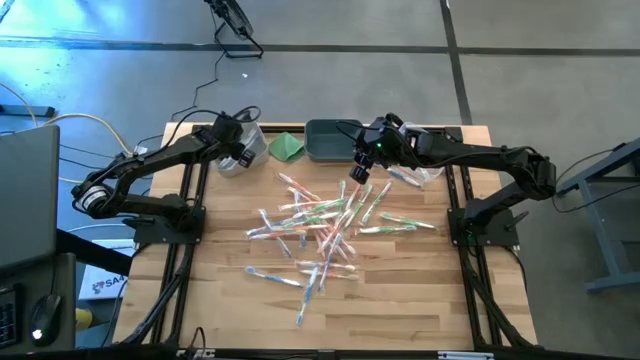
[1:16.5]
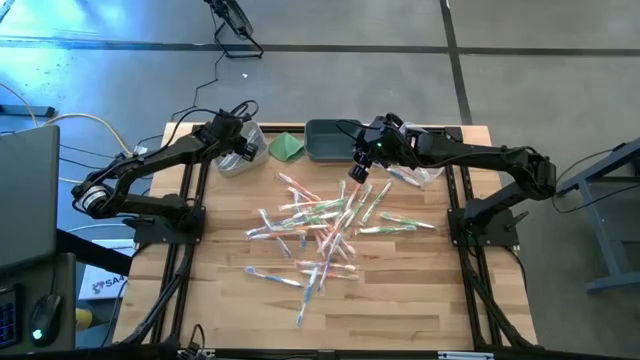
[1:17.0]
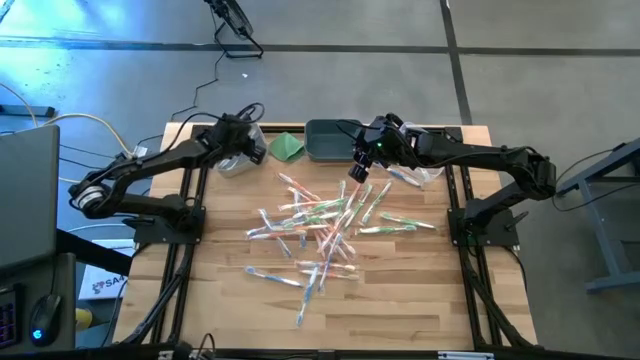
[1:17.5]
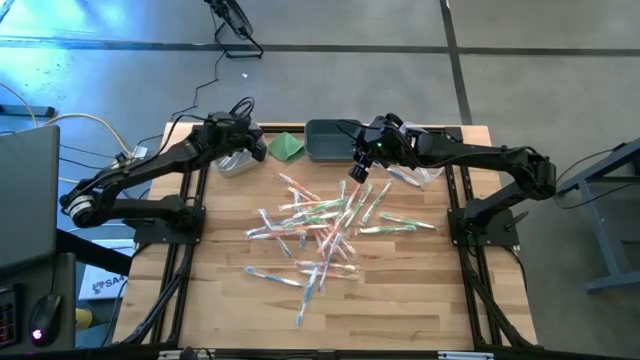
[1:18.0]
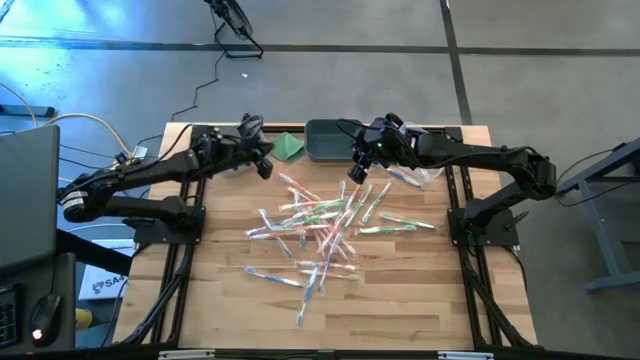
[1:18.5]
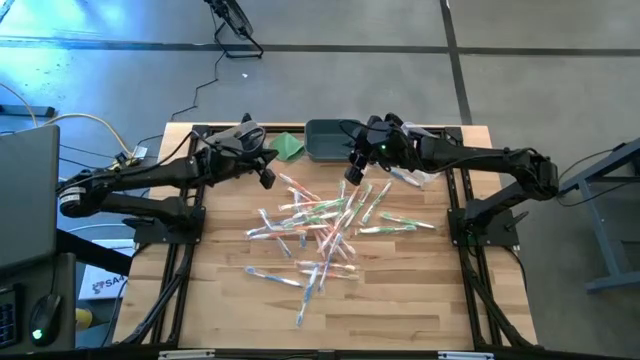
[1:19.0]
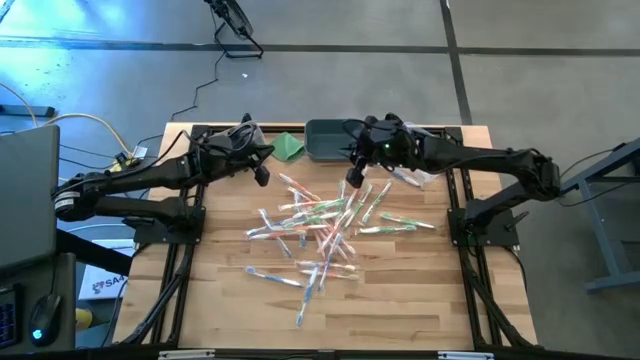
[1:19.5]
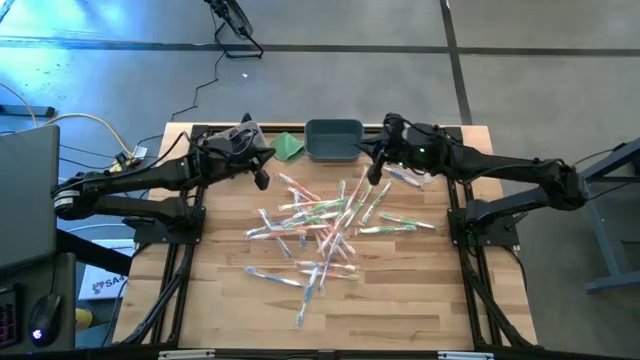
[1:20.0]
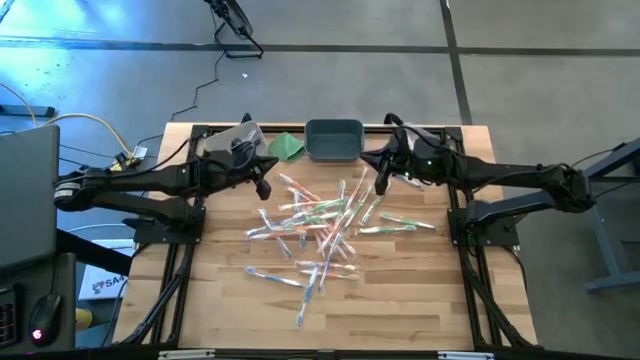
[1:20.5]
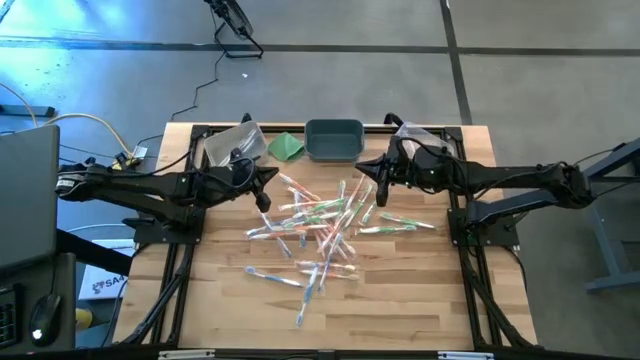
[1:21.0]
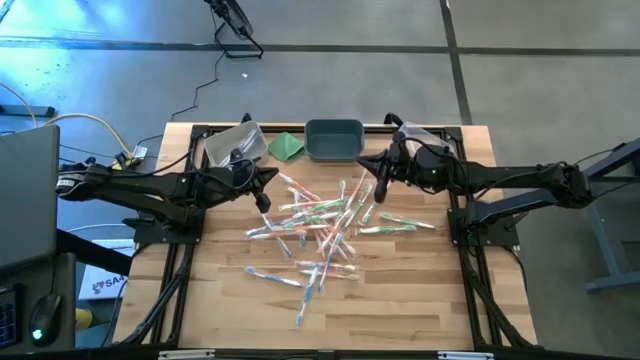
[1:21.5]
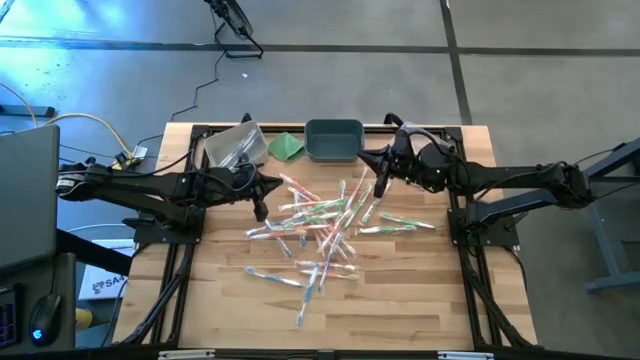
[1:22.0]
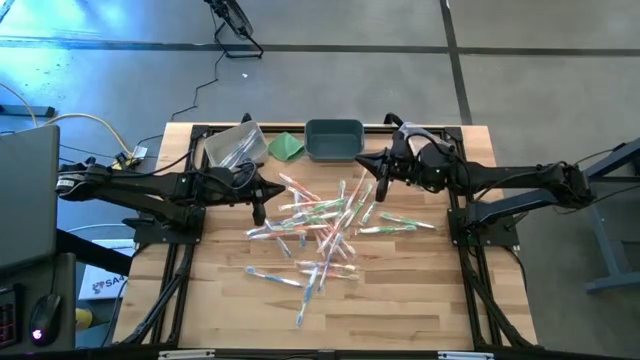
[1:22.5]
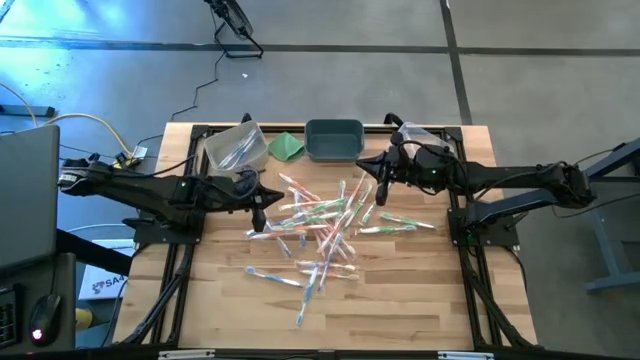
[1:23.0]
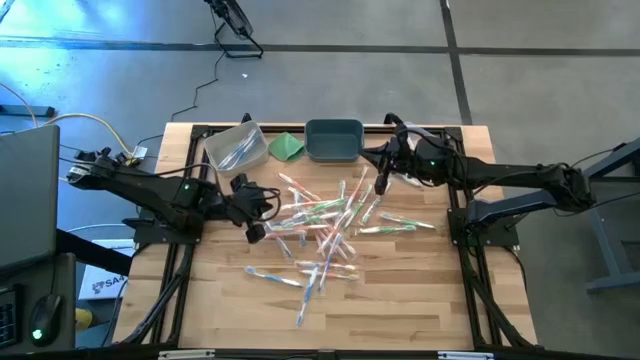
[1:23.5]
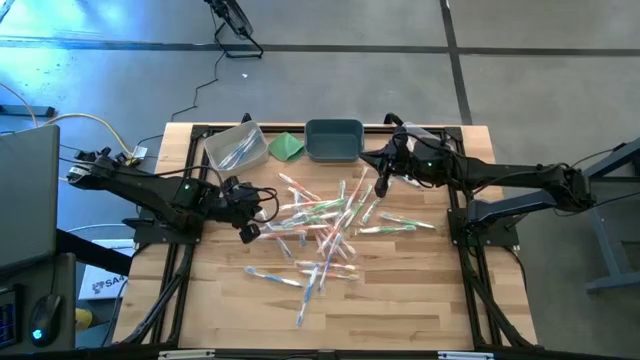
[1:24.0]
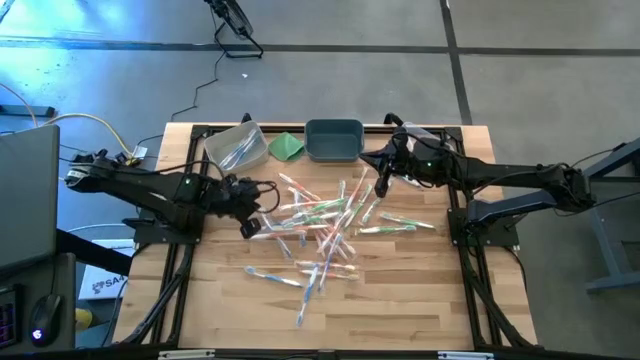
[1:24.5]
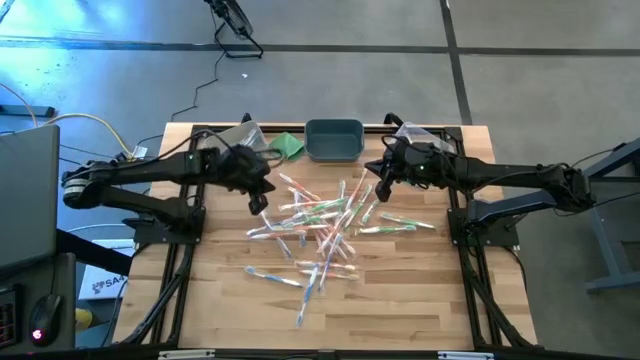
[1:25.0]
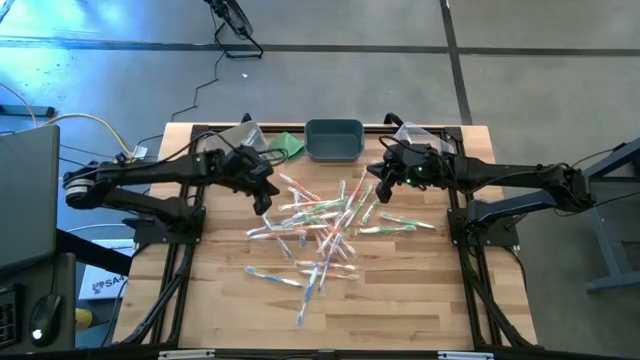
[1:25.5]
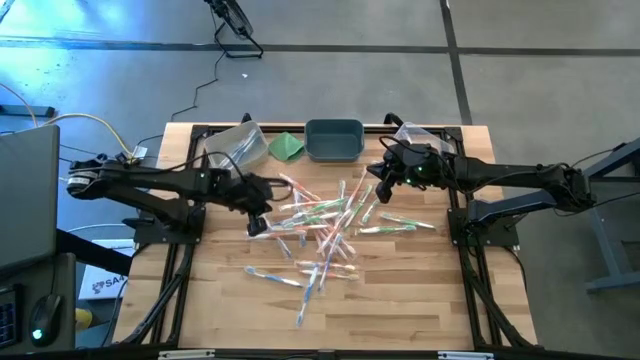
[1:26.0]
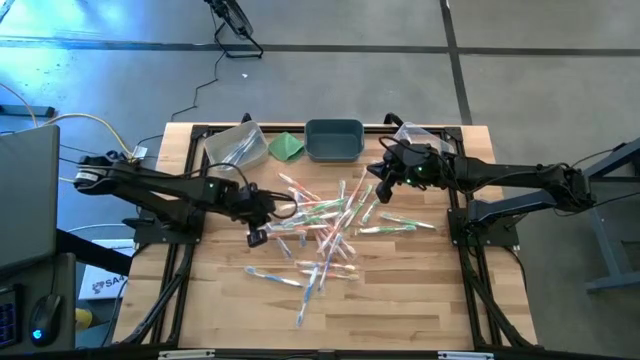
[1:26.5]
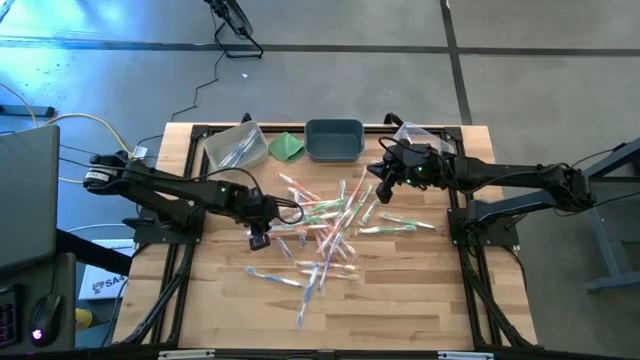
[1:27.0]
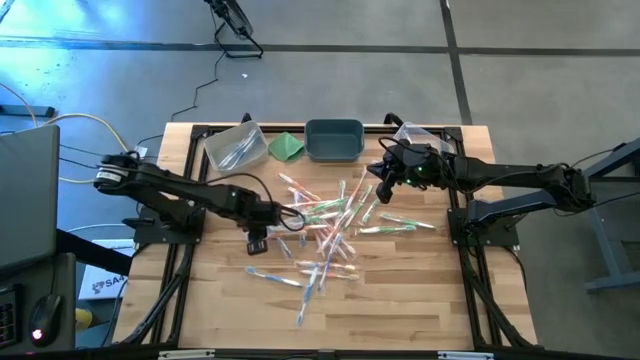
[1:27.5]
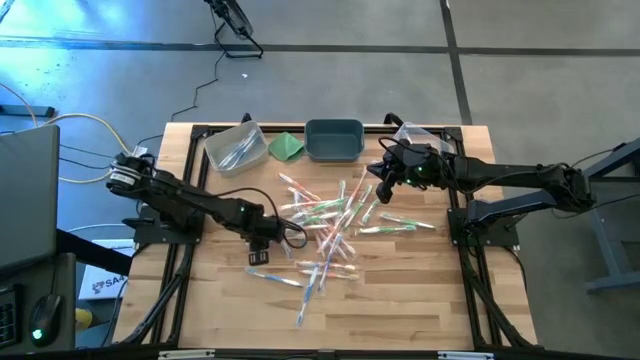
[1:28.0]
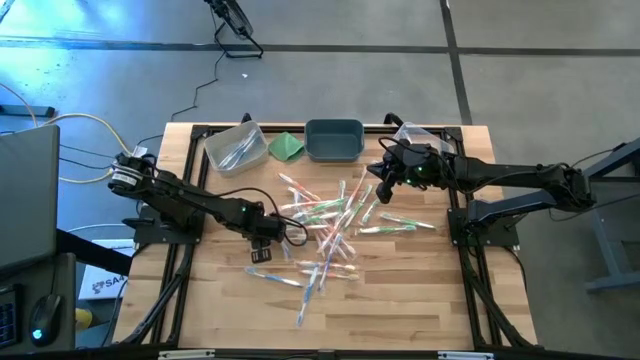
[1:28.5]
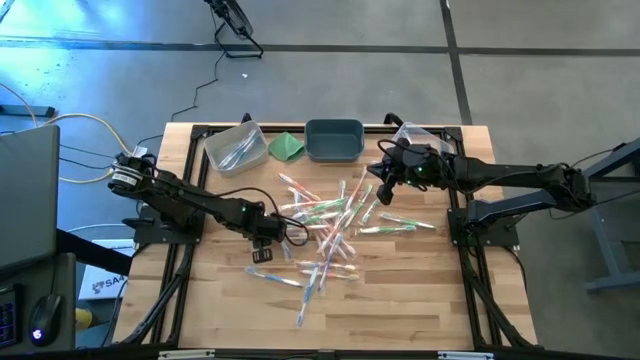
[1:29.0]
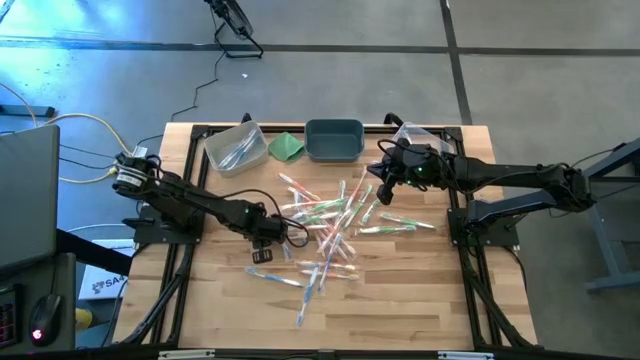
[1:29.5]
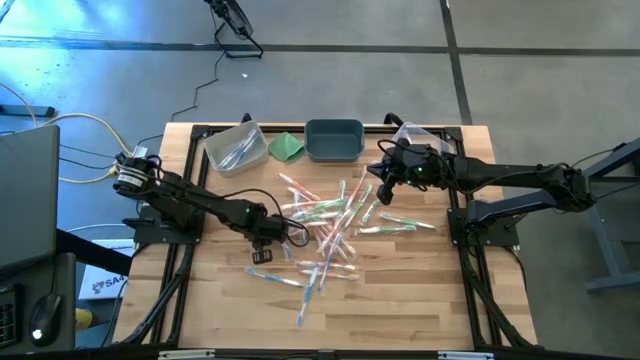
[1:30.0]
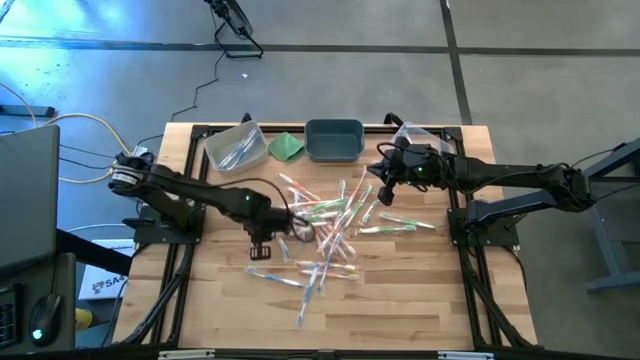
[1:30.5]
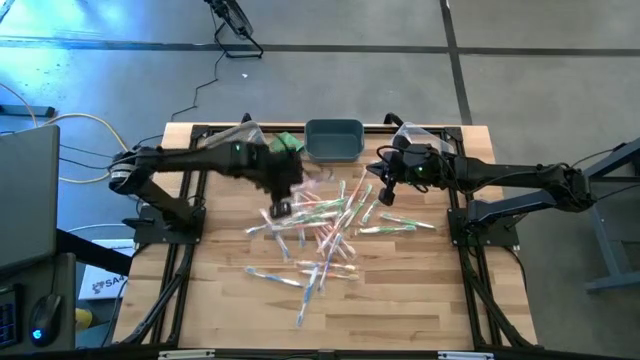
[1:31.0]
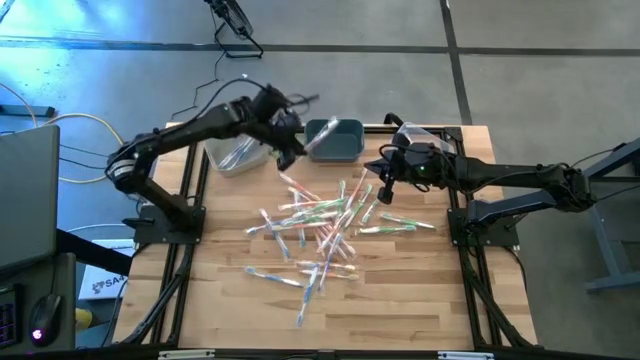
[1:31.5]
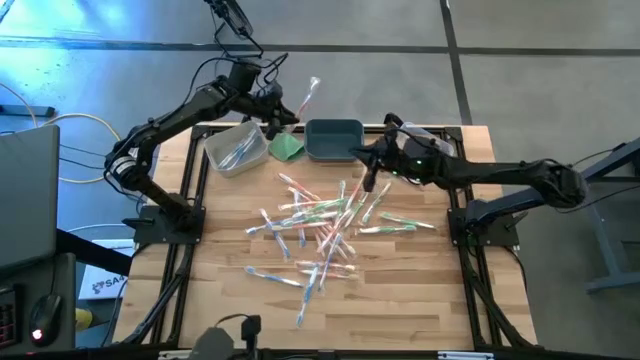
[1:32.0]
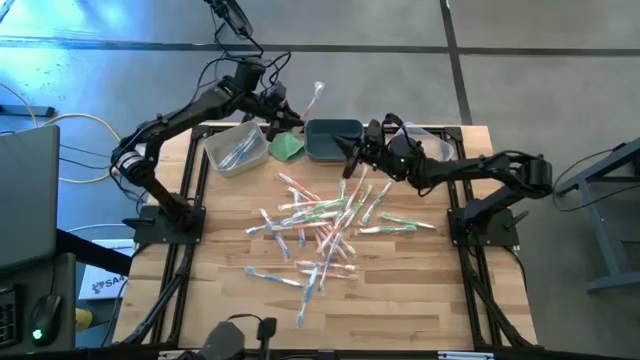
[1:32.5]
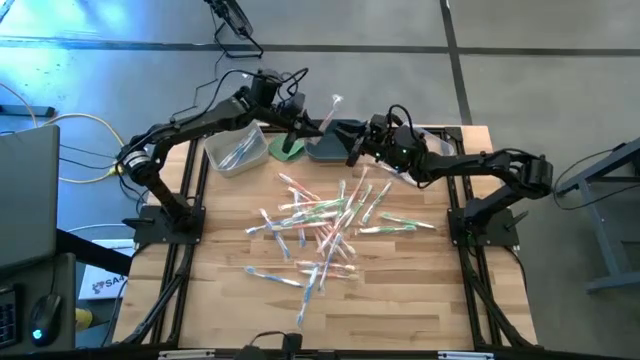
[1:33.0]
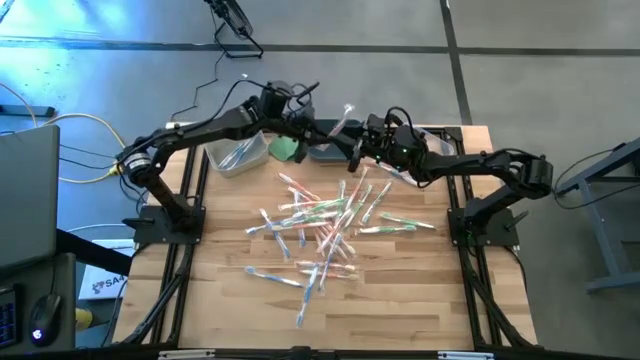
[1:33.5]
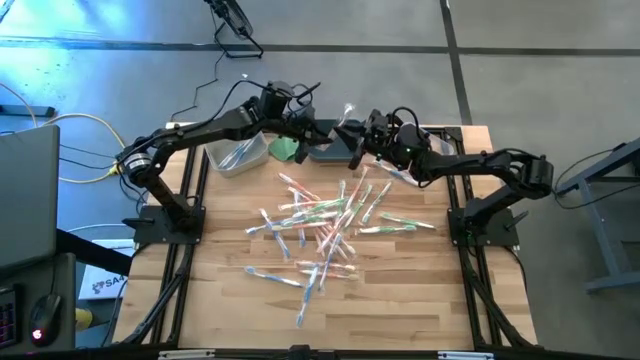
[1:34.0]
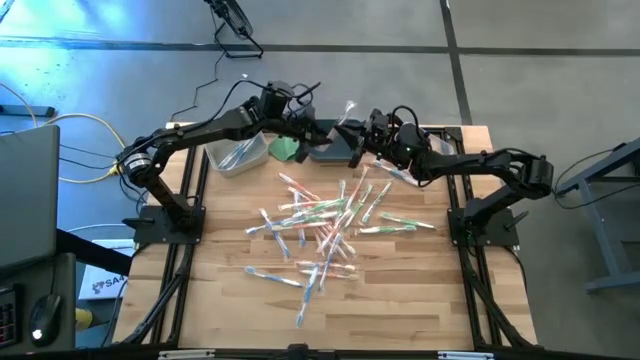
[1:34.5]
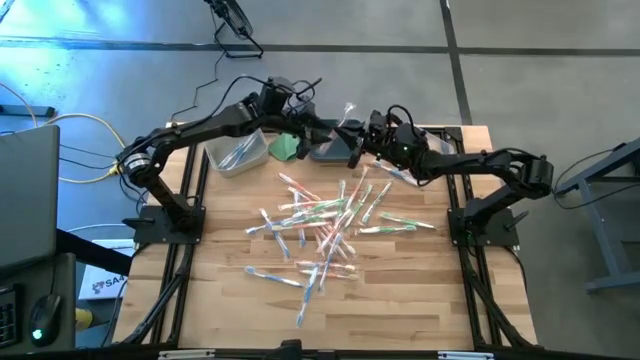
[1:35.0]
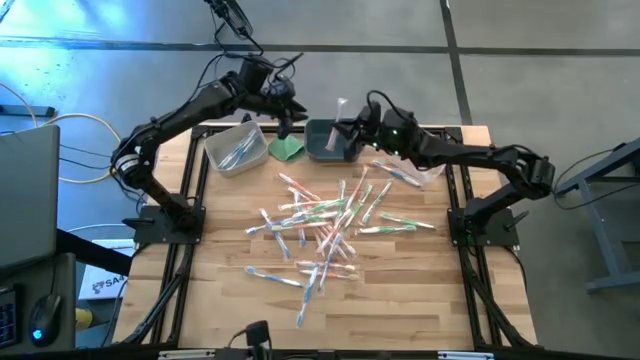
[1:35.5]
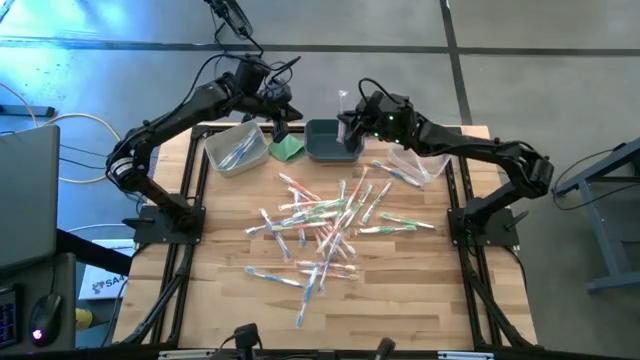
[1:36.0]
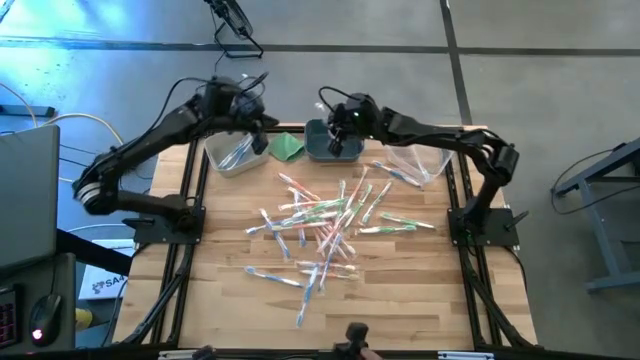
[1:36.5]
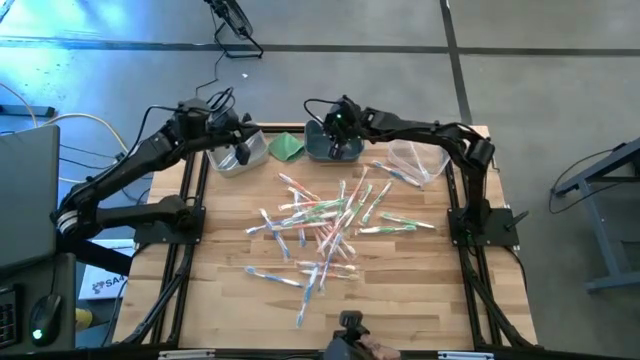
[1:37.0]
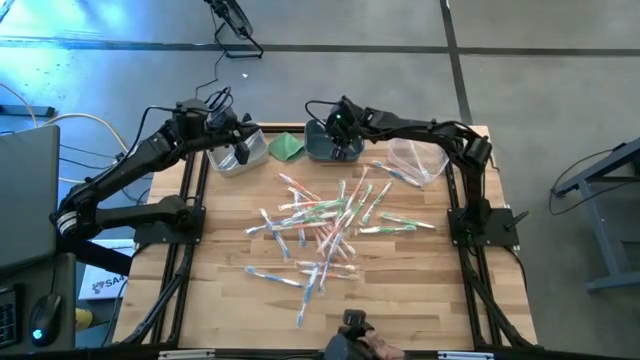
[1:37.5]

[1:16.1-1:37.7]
Task: Pick & Place Toothbrushes
Put the orange toothbrush into the blue bin
